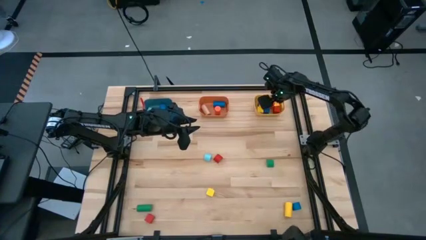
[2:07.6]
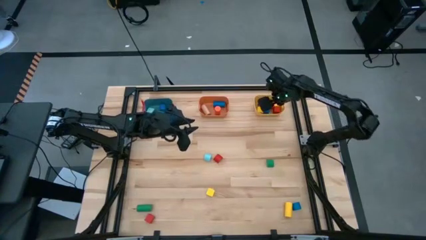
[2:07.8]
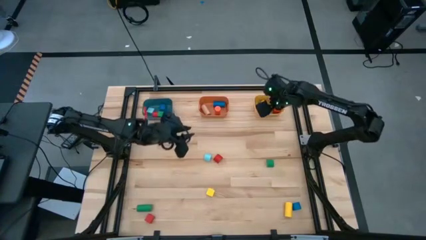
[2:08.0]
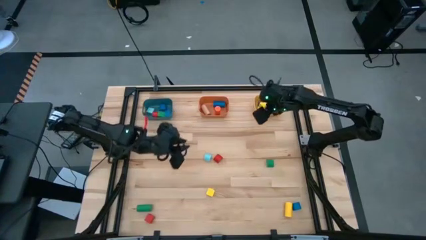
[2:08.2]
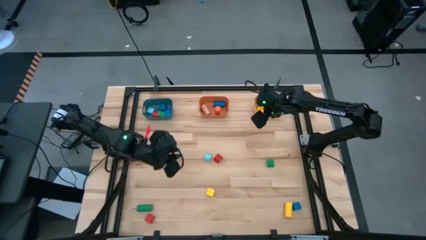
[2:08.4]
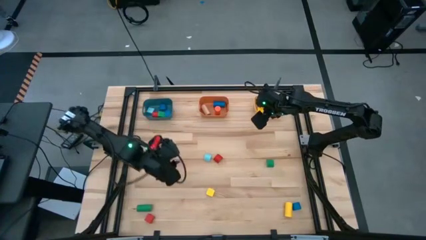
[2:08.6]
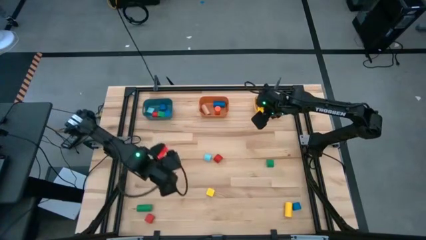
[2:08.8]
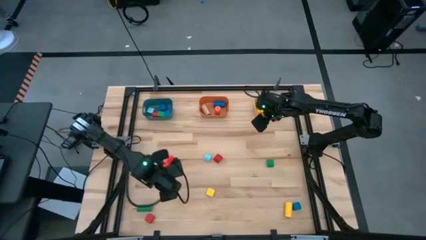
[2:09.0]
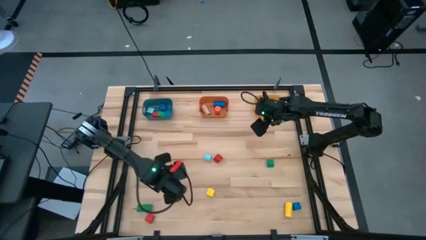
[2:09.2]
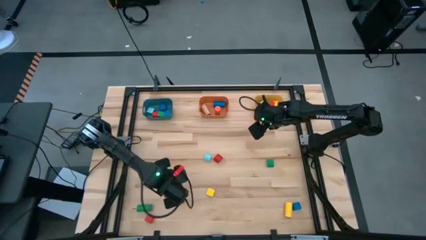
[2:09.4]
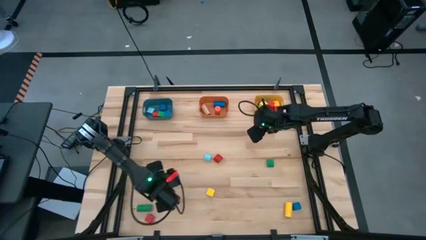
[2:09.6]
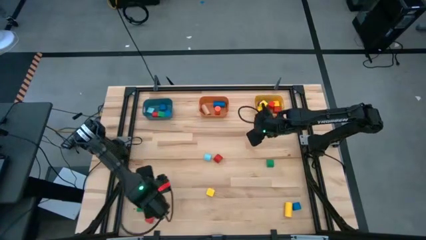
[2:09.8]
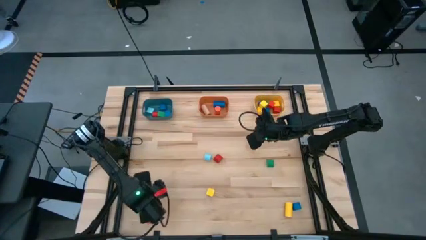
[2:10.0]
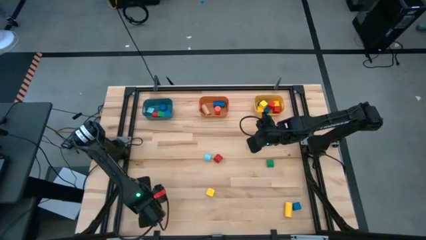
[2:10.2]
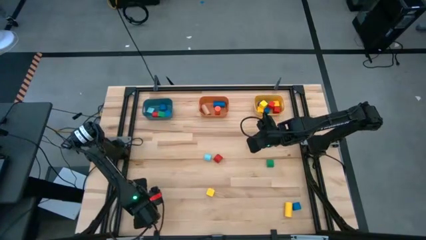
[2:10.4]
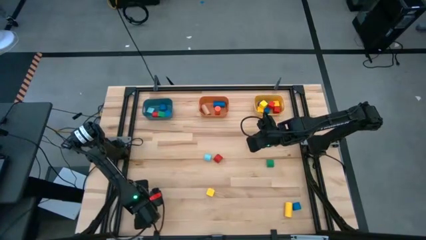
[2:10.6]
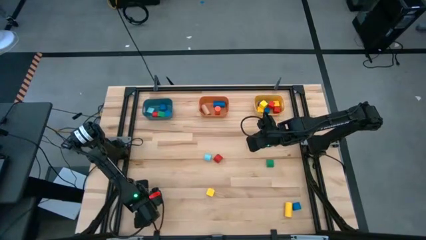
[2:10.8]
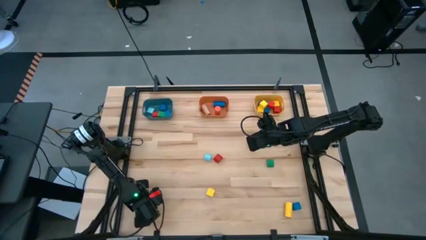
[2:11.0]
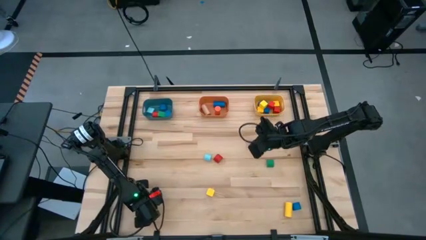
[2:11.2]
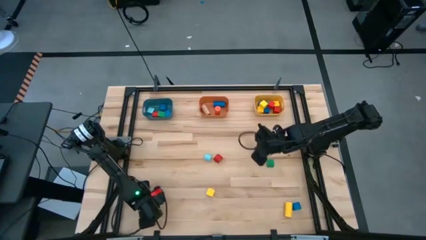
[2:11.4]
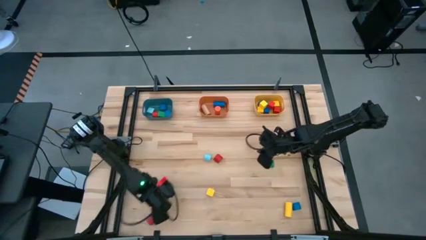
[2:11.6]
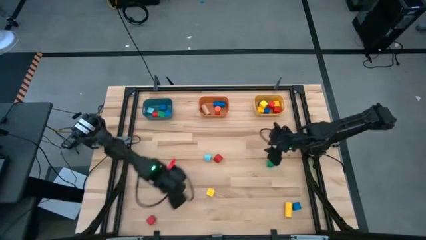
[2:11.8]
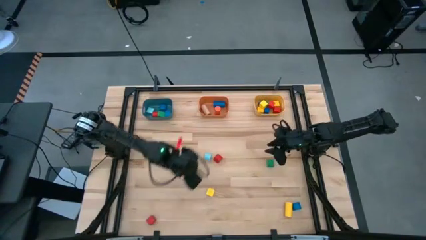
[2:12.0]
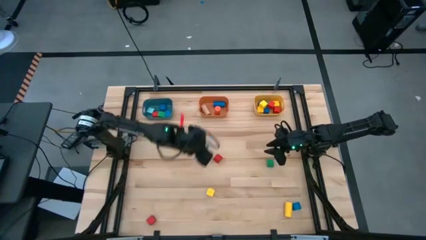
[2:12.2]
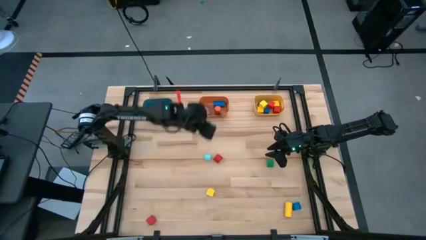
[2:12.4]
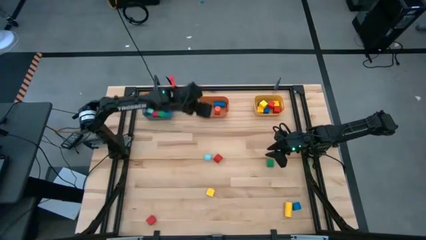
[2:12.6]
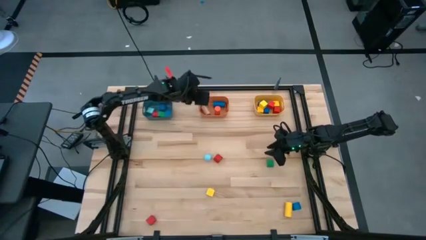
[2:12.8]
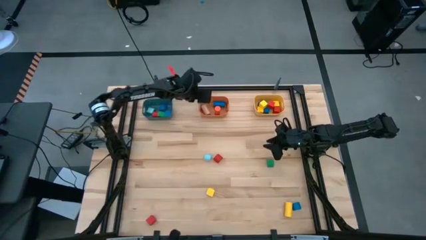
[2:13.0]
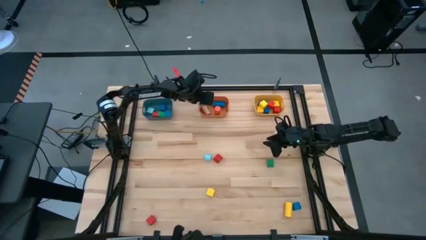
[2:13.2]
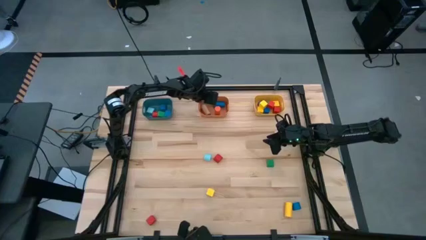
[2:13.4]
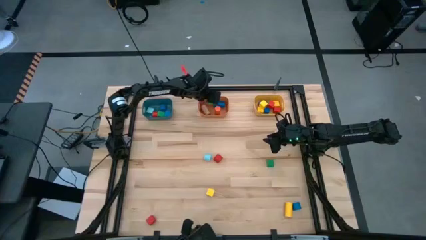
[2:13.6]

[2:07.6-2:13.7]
Task: Sort blocks by size
Put the green cylindrical block into the orange bin

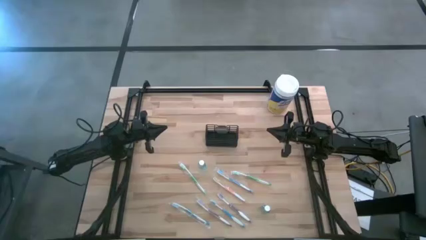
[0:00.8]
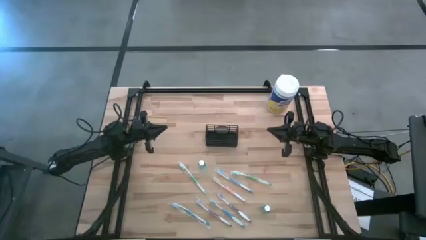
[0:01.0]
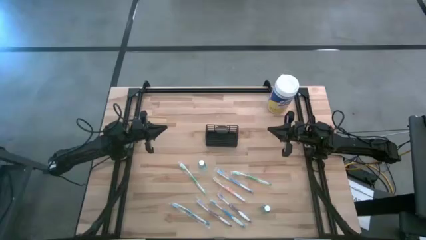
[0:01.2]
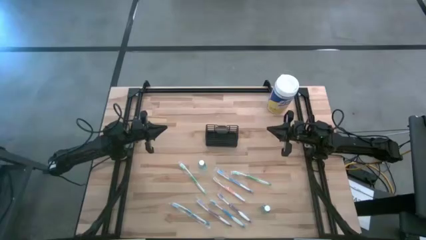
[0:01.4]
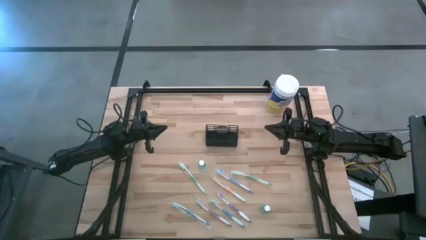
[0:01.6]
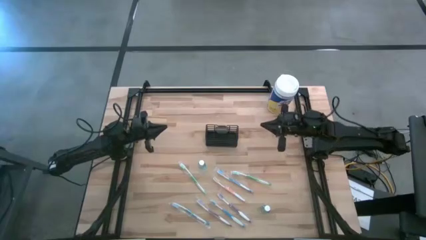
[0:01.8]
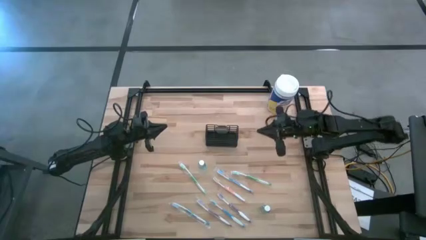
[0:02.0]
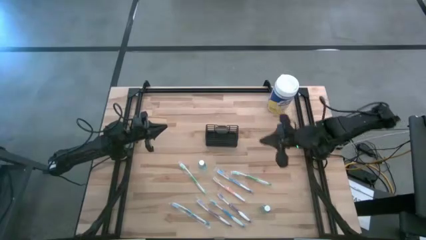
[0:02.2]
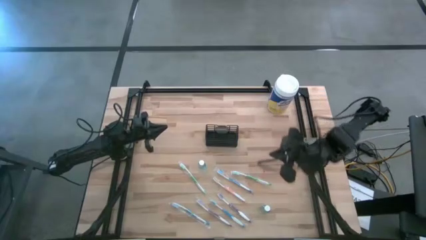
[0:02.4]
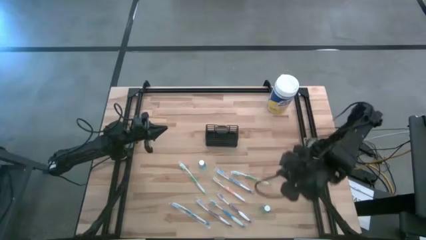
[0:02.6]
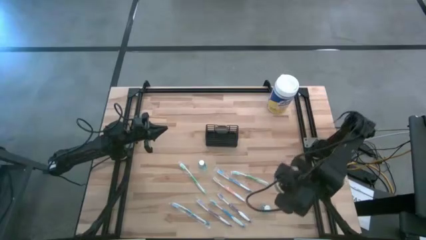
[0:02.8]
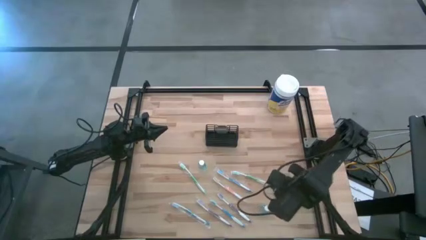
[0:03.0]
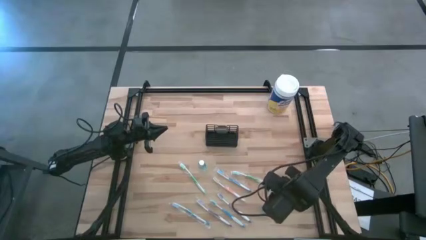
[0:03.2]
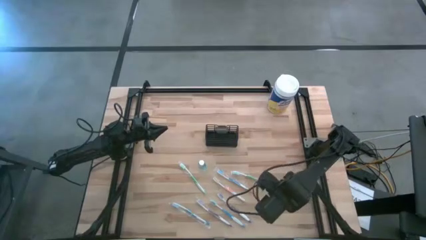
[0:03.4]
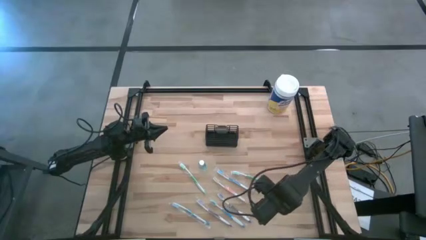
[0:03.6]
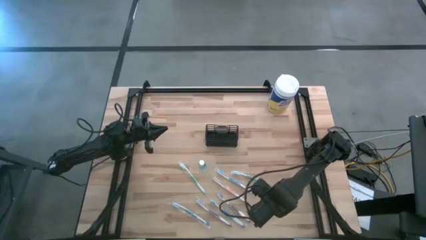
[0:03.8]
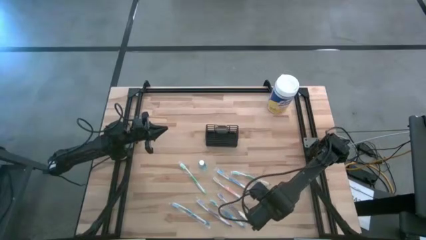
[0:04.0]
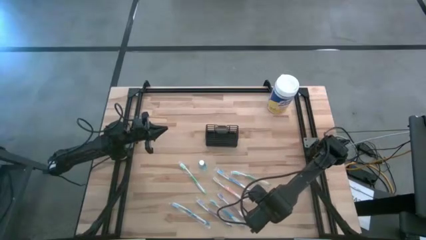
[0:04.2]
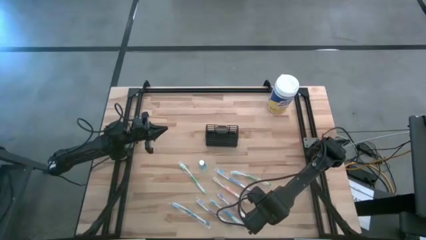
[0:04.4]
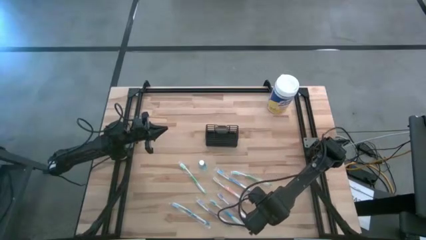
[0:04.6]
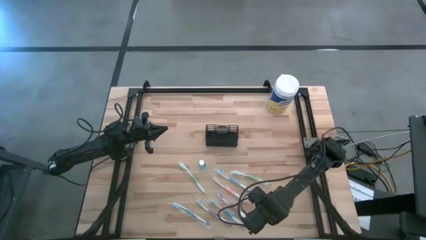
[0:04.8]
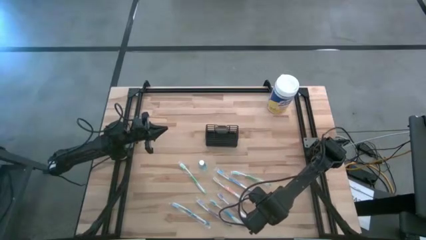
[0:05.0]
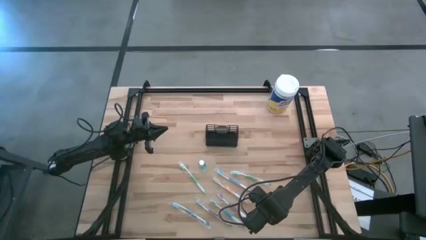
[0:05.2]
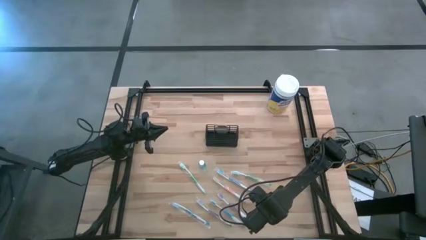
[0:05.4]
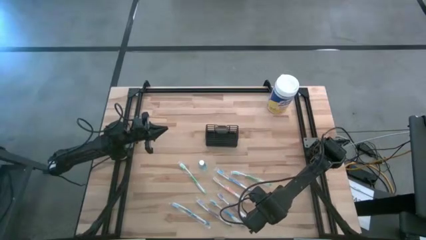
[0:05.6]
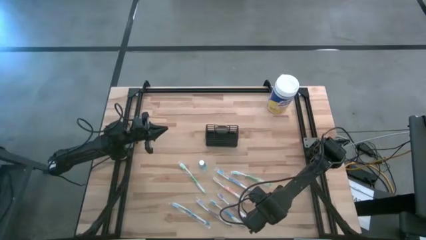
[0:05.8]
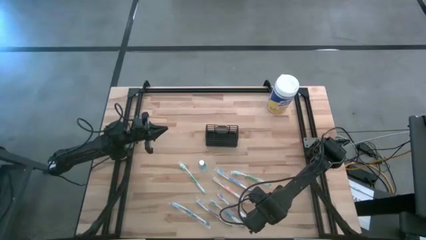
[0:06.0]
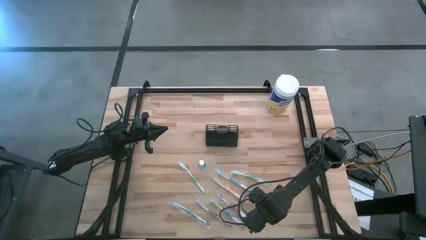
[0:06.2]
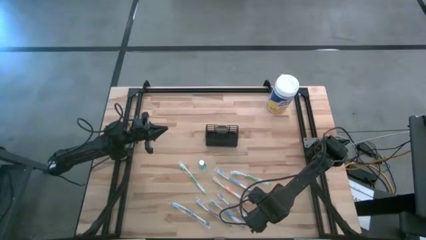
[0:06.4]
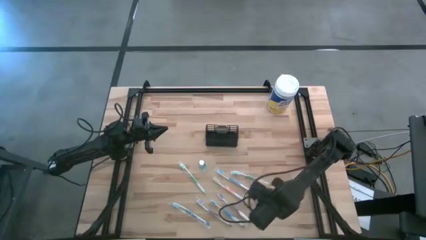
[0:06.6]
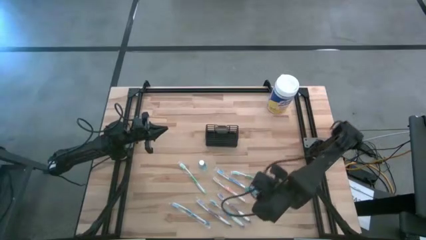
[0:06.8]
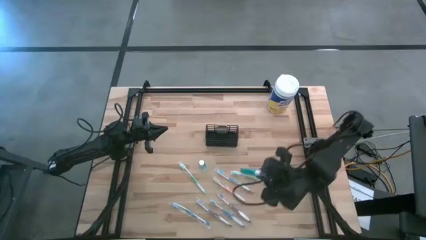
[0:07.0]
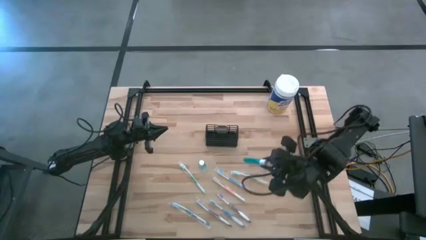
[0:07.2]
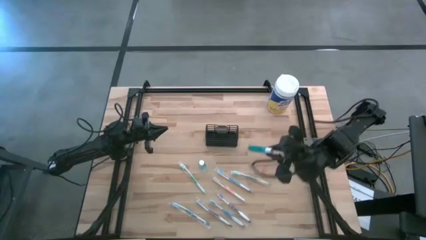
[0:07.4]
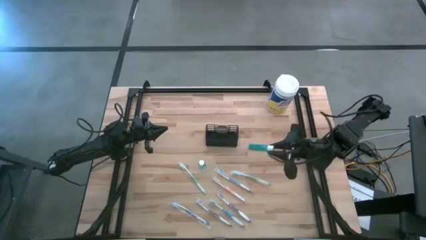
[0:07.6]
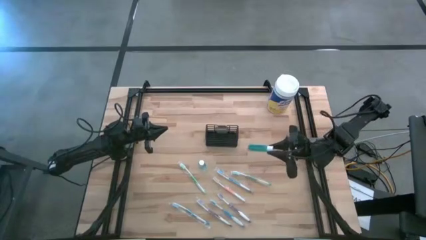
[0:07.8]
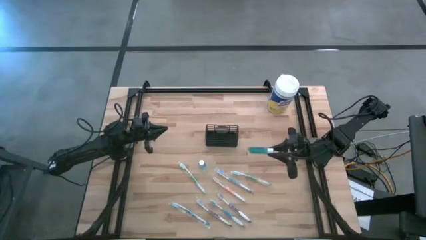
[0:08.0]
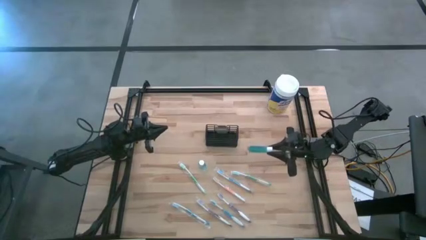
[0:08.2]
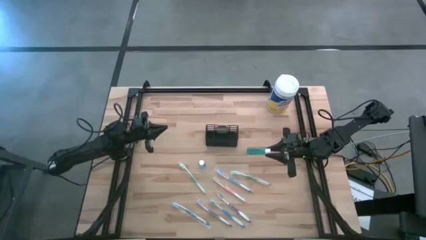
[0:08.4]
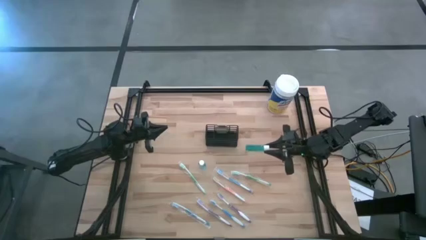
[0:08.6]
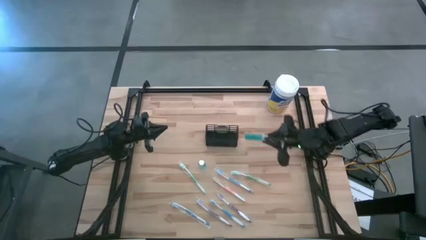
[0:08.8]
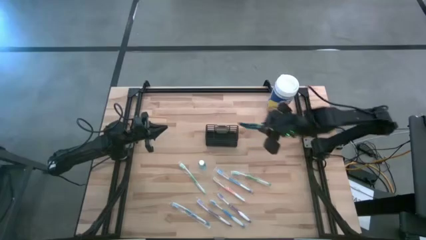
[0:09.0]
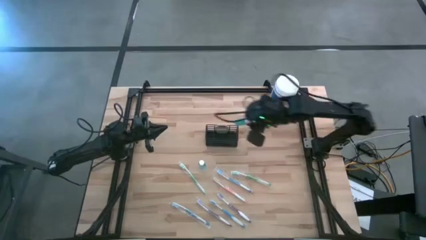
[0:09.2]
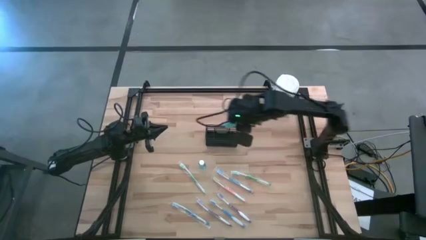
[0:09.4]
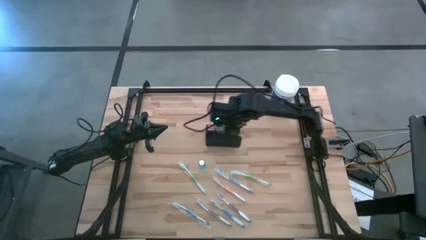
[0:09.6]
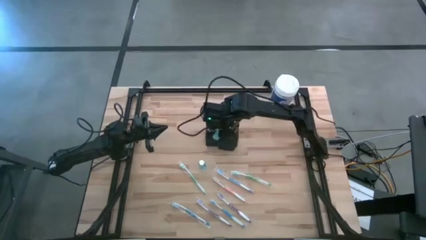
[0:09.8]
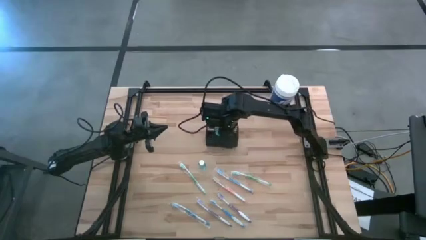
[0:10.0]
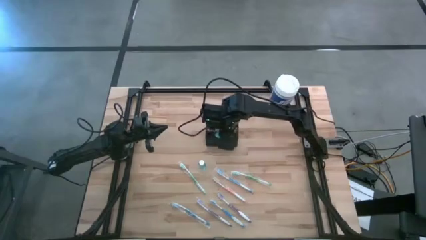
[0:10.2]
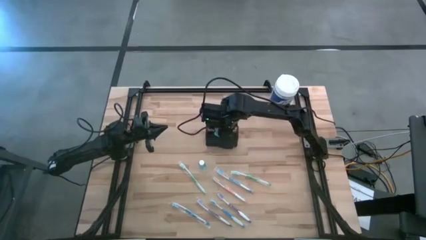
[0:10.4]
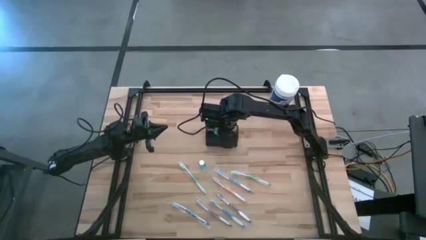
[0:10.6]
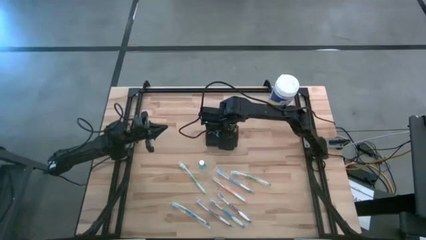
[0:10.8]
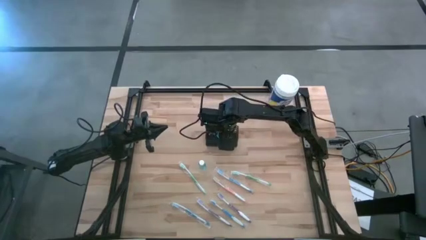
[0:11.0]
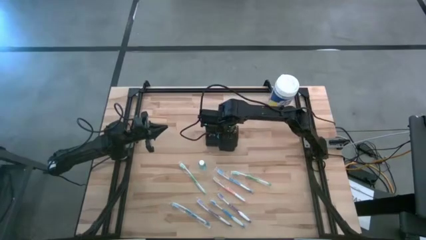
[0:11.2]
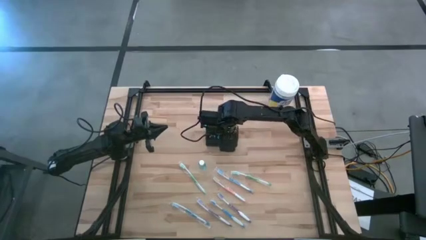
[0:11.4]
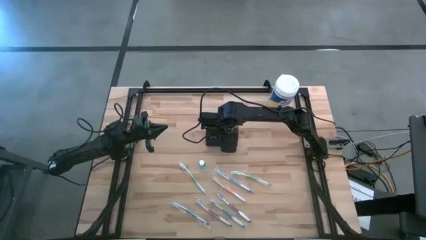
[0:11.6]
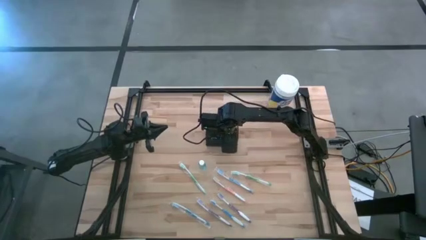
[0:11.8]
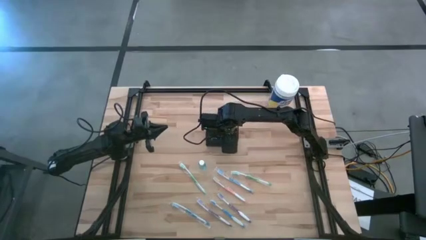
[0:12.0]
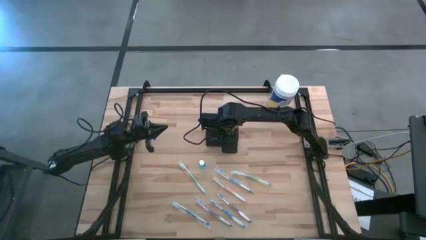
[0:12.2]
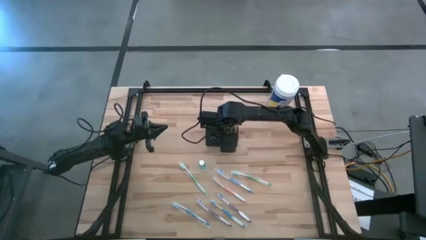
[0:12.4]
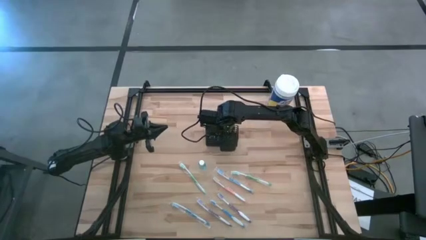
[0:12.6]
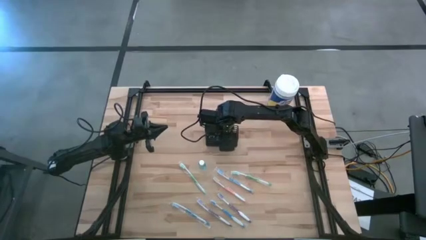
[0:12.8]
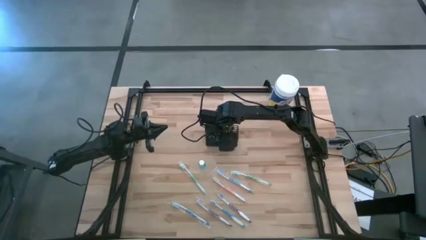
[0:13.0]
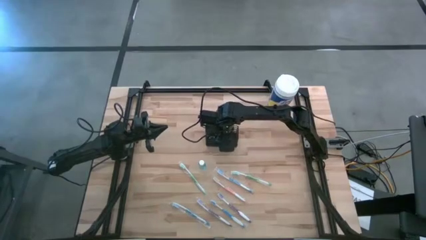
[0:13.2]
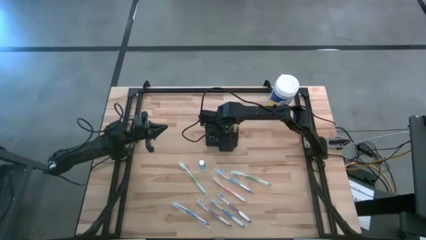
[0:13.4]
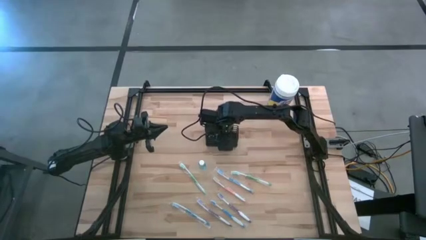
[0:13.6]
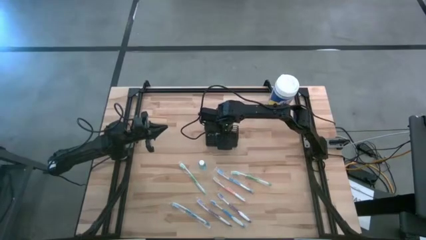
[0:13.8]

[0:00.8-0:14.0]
Task: Pick & Place toothbrushing station
Put the bottom mouthwash into the wire organizer
